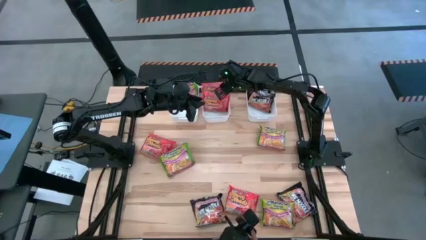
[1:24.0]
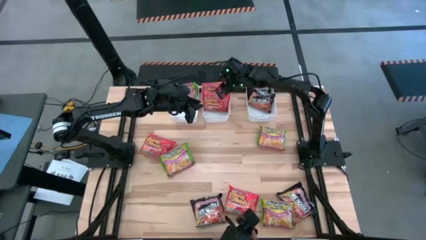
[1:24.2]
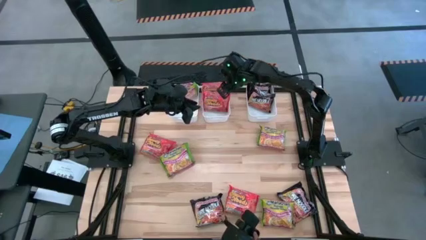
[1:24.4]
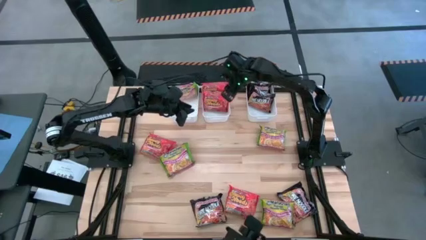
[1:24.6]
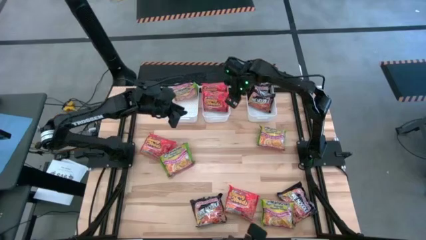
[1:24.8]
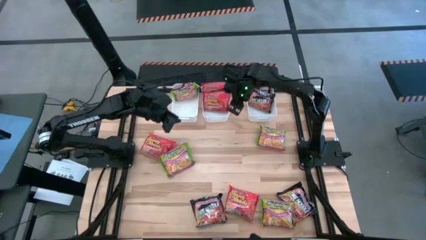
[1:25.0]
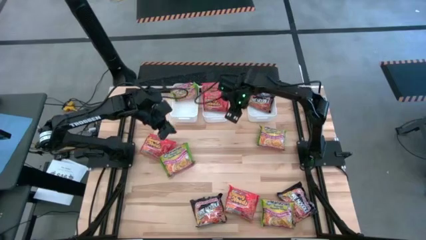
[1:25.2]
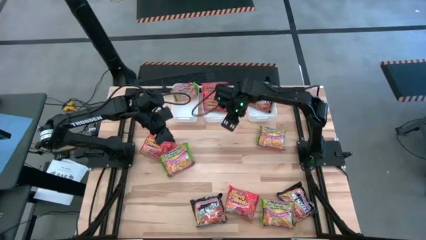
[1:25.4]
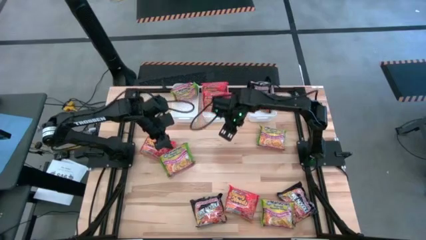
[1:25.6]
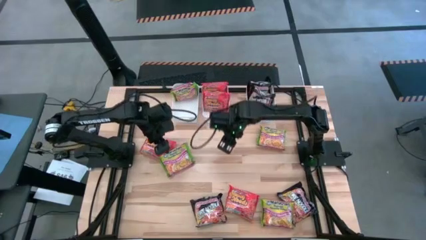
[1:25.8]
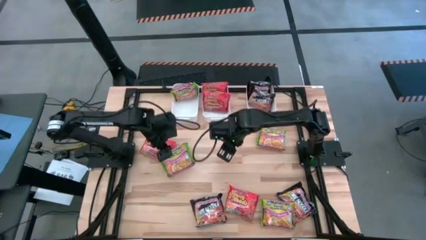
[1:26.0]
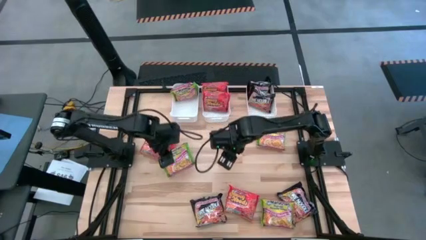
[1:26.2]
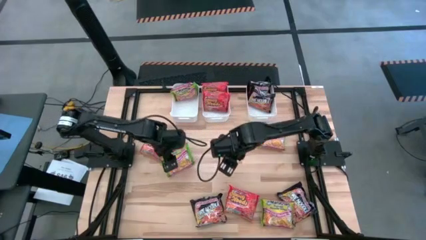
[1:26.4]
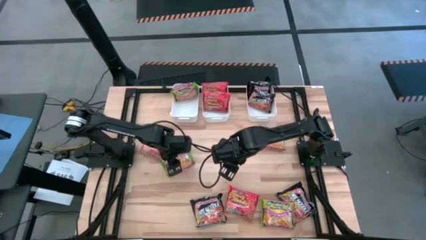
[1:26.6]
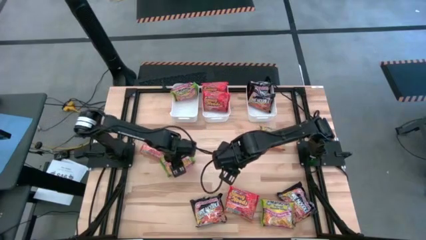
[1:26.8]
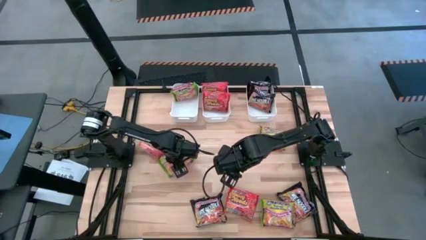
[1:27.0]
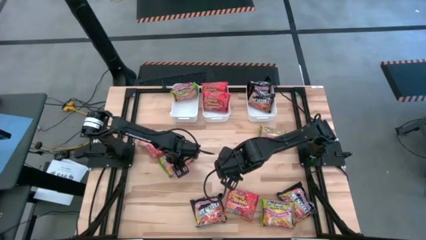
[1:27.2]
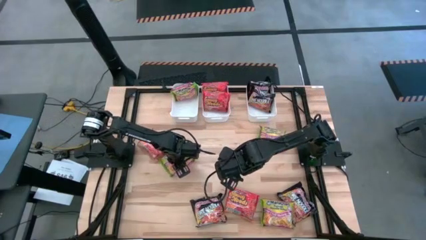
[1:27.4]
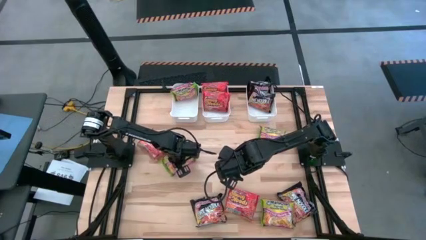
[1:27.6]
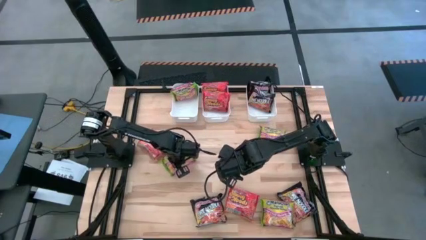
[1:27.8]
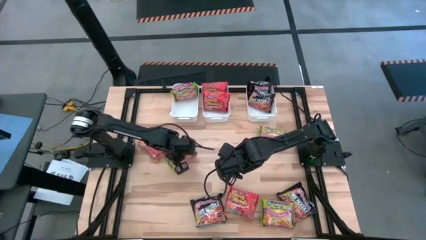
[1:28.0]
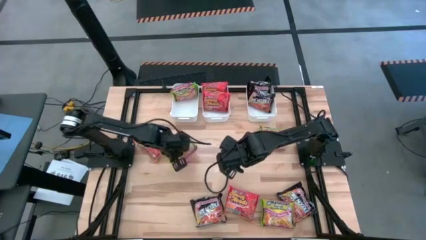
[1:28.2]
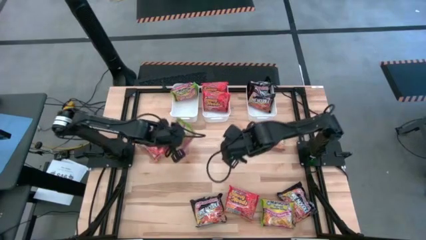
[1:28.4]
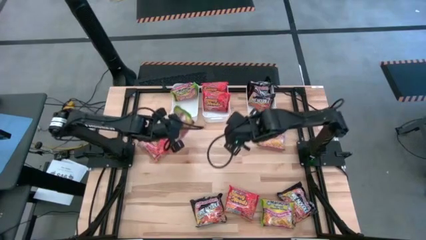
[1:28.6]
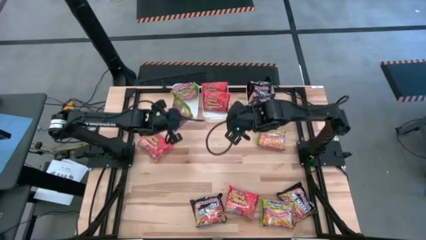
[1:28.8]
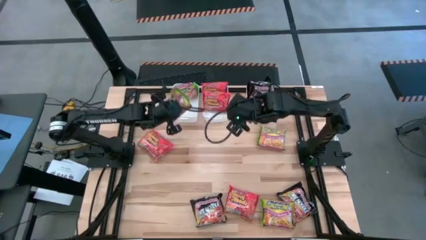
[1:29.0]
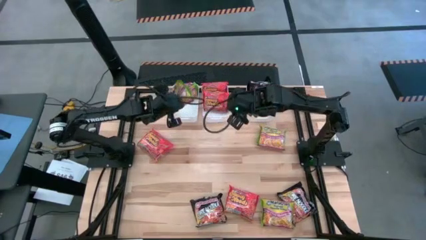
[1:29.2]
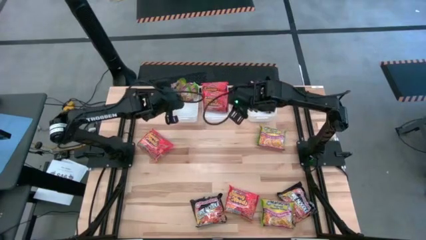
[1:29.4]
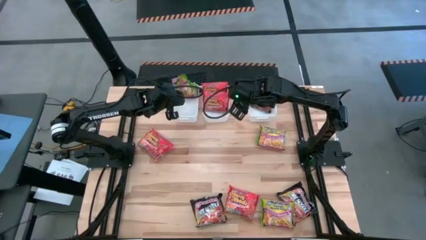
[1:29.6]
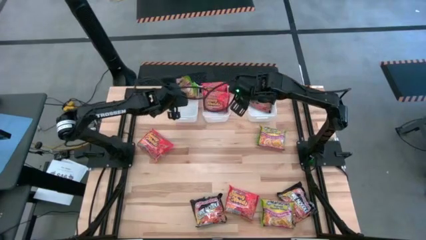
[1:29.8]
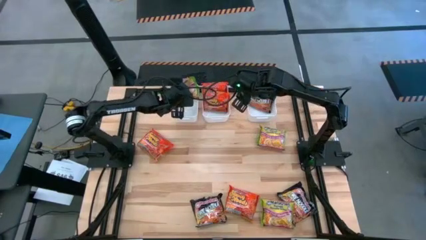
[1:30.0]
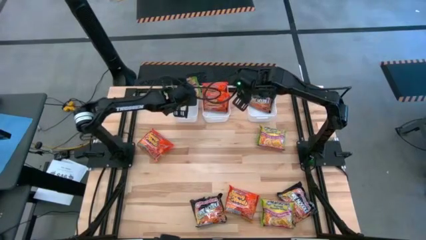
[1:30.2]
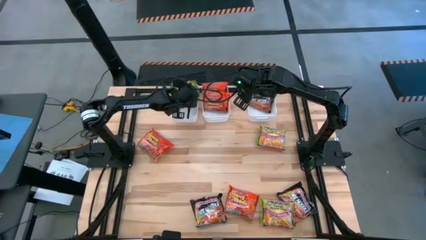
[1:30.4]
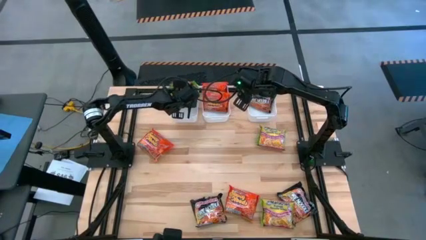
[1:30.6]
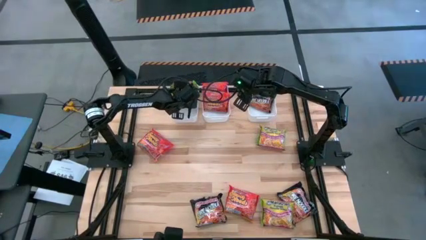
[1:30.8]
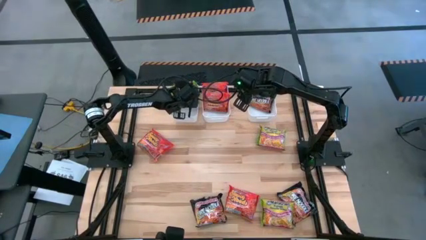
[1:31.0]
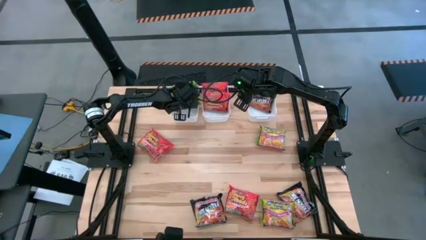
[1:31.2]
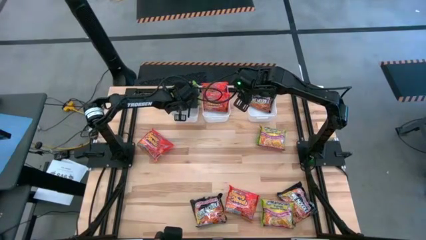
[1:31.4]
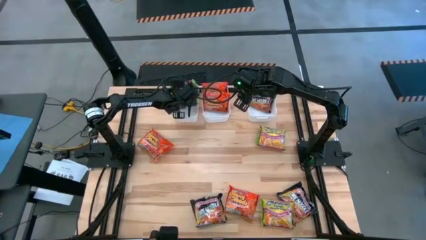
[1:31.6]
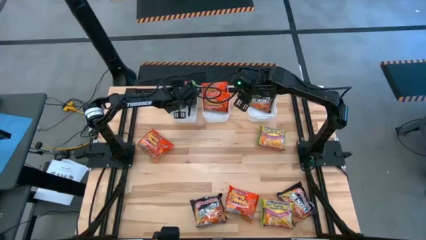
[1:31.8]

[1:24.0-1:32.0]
Task: Sort Maruchan noodles
Put the green noodle pack into the left white bin

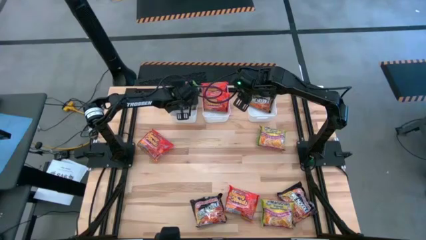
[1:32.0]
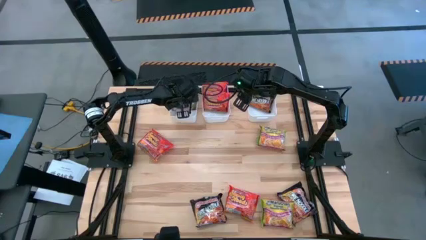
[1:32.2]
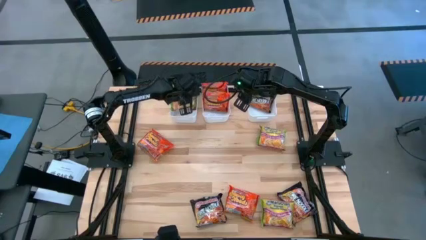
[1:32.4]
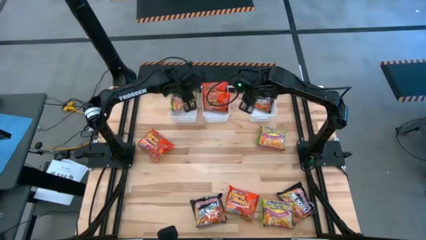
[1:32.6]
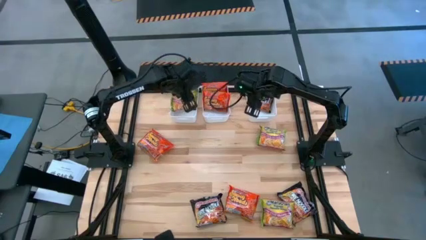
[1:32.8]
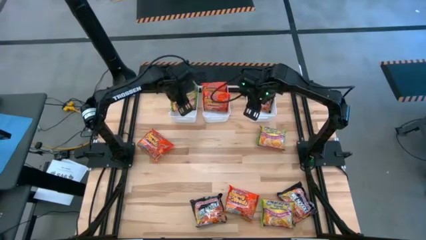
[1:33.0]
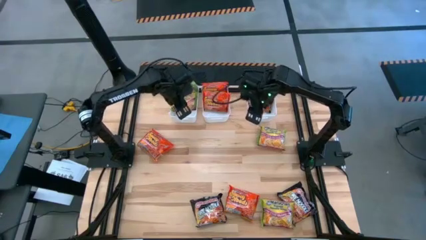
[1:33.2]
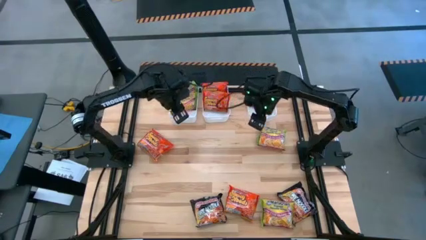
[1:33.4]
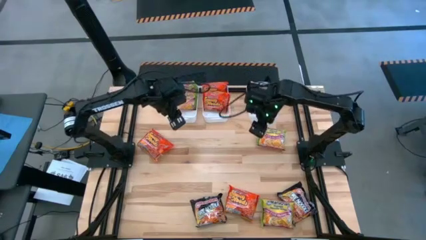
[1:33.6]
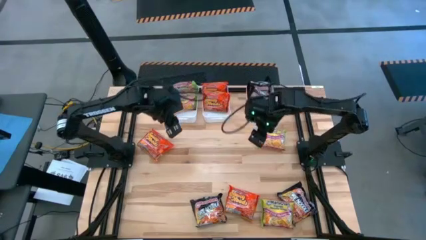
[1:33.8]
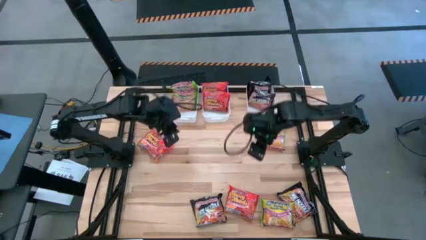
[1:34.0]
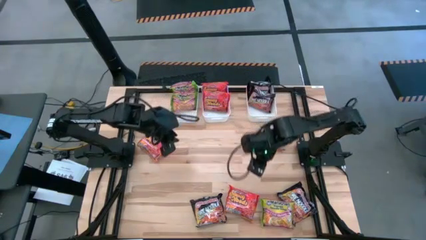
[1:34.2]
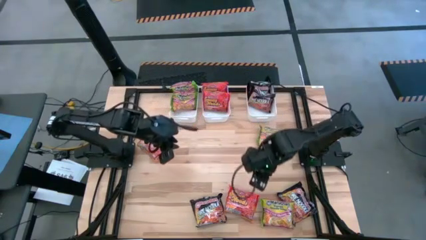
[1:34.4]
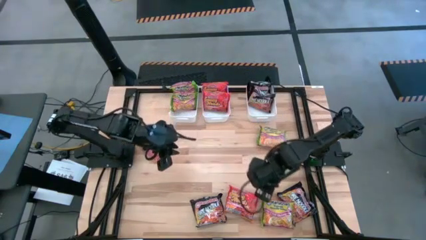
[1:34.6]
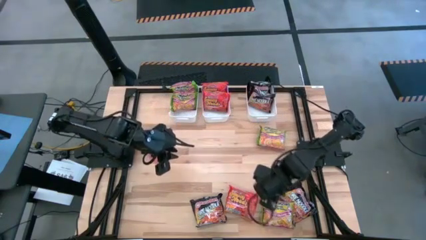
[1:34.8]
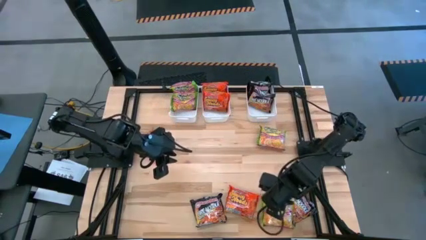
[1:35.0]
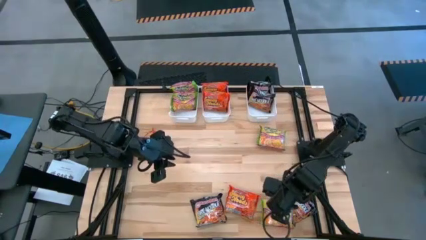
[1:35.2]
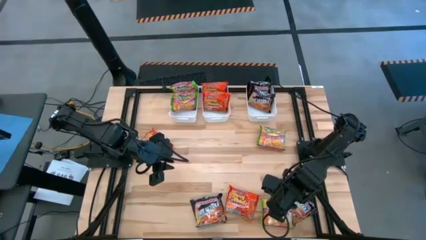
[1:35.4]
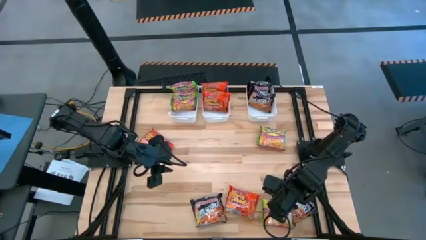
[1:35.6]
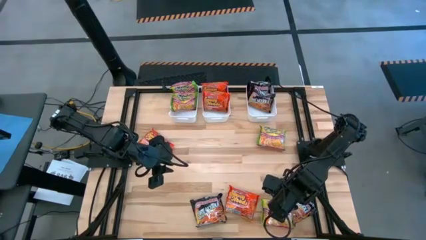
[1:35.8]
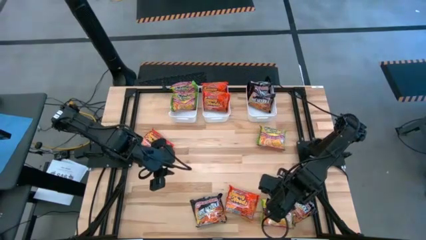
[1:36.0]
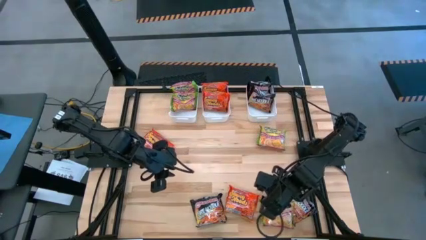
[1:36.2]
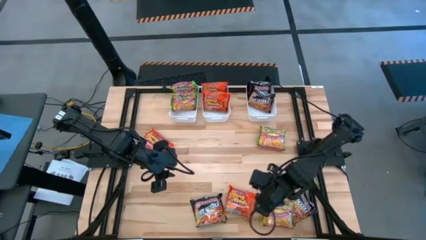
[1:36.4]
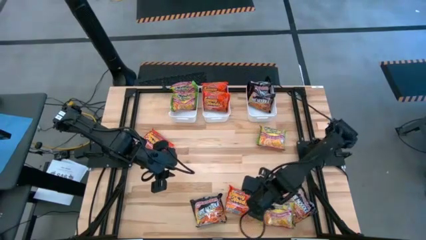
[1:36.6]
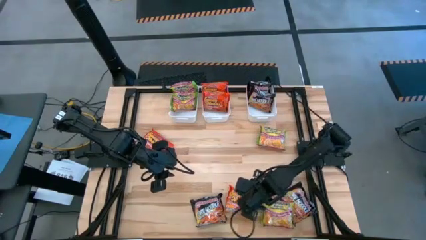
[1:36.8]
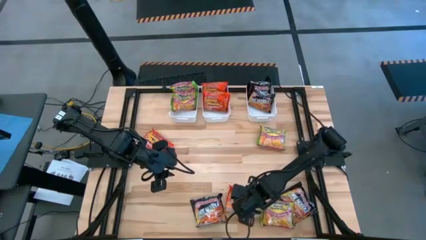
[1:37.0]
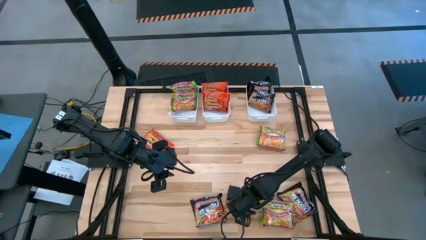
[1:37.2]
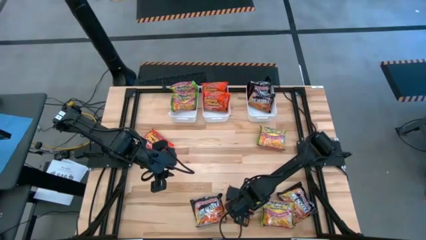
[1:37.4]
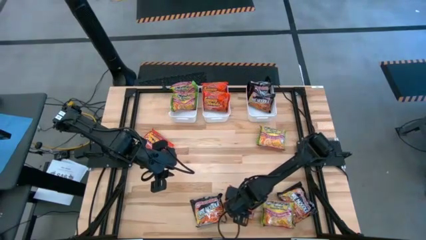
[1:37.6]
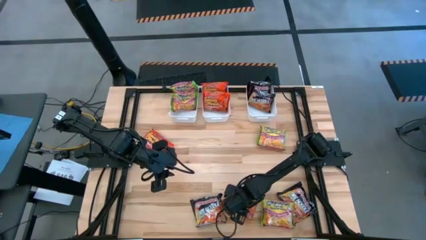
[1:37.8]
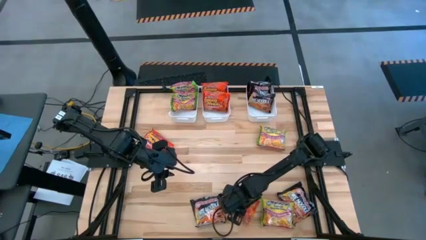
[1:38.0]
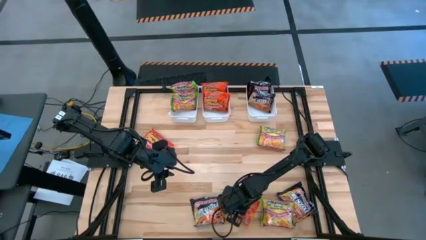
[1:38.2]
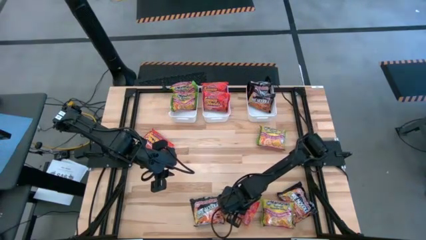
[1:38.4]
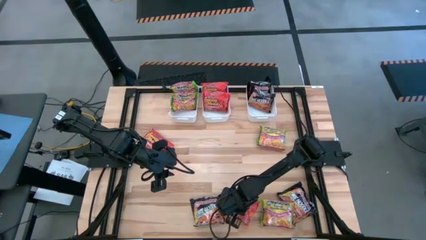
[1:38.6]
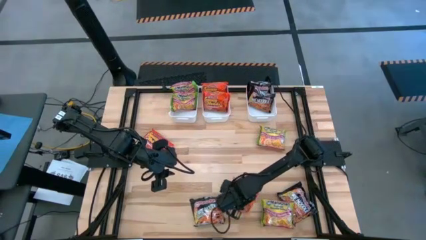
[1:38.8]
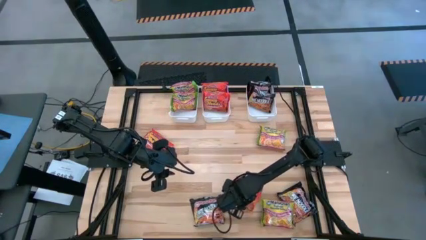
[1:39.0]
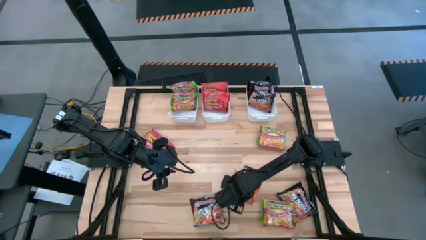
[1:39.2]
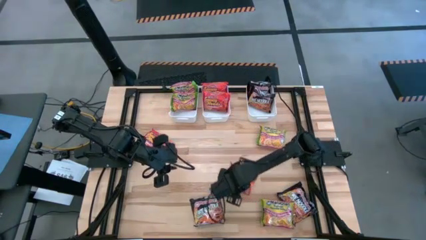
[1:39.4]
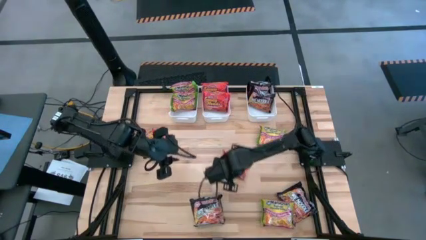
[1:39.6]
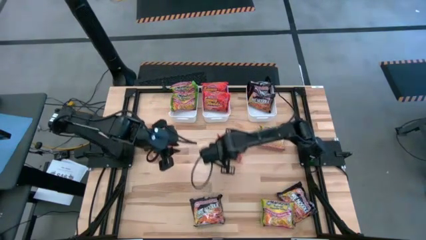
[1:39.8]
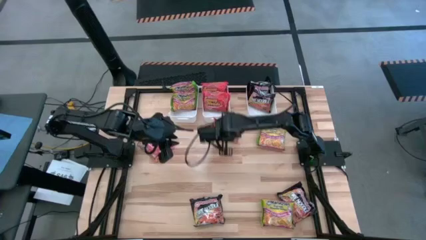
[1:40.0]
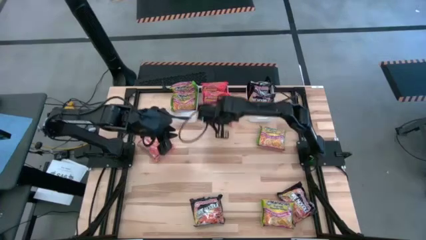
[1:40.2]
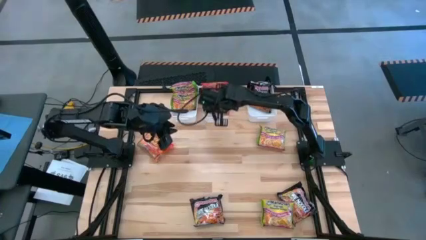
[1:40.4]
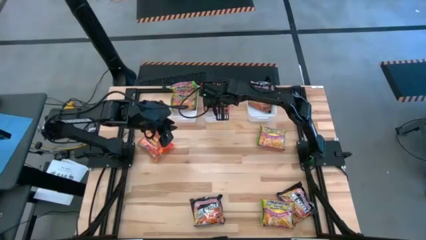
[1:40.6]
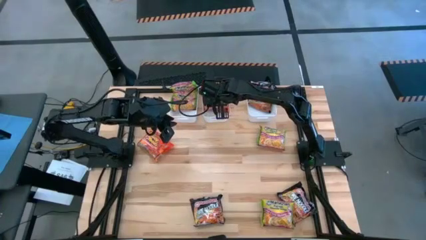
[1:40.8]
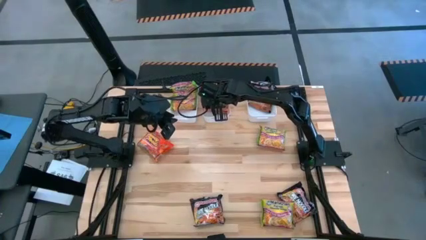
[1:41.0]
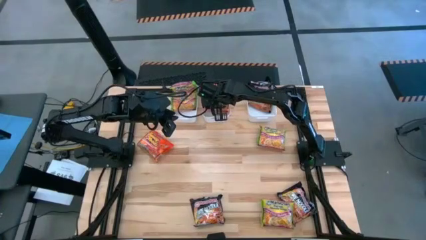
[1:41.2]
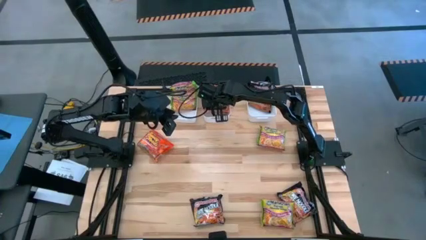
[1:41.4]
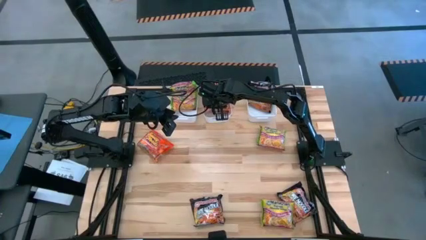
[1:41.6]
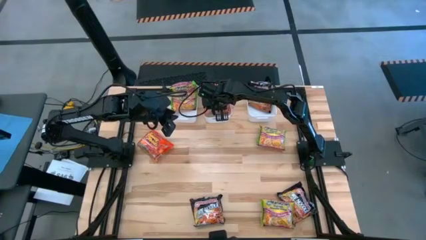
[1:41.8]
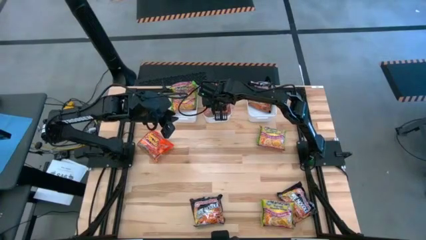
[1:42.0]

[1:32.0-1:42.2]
Put the orange noodle pack into the middle white bin
